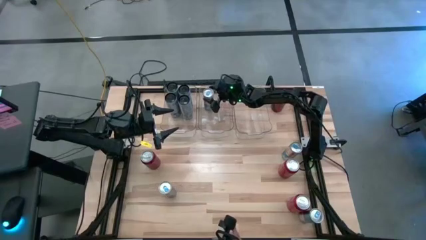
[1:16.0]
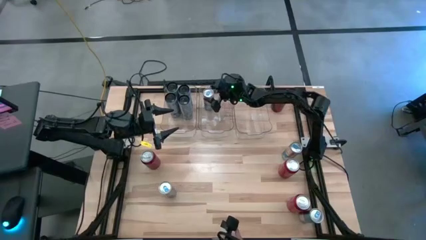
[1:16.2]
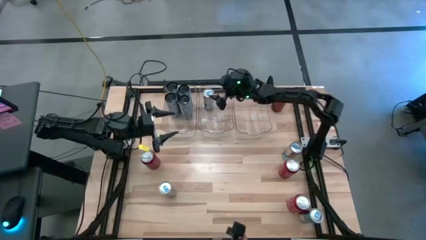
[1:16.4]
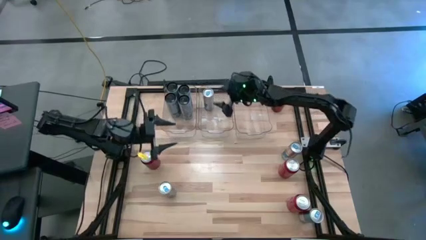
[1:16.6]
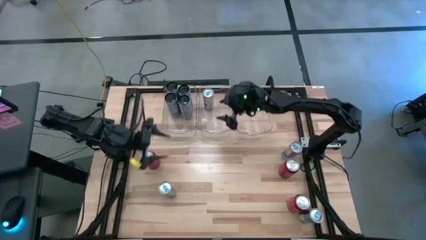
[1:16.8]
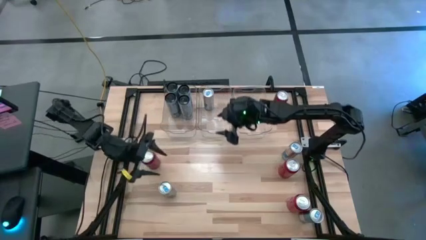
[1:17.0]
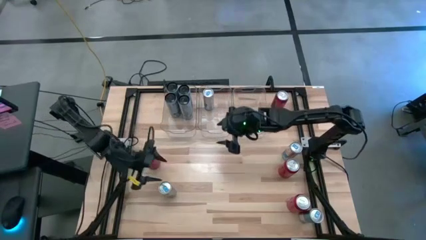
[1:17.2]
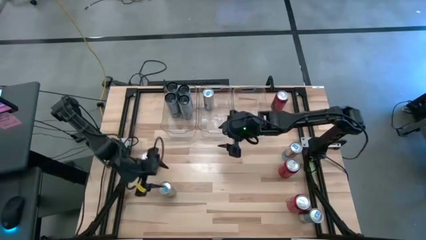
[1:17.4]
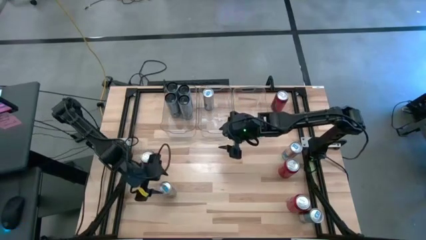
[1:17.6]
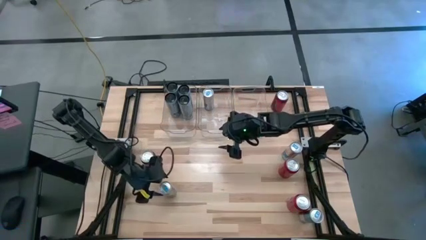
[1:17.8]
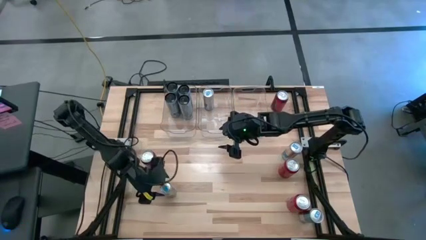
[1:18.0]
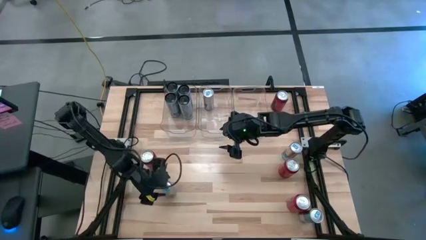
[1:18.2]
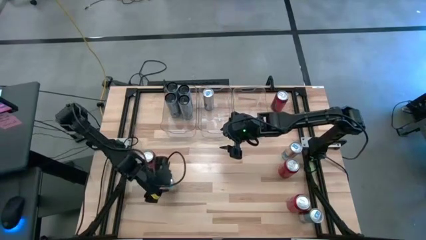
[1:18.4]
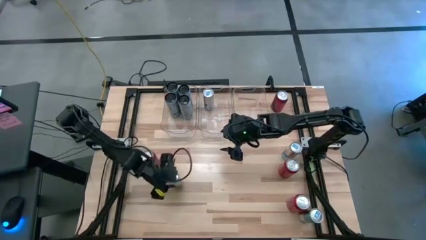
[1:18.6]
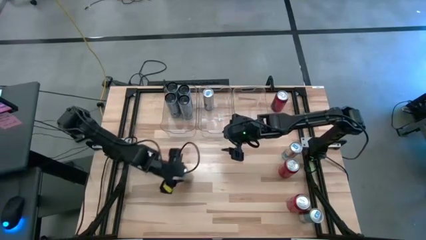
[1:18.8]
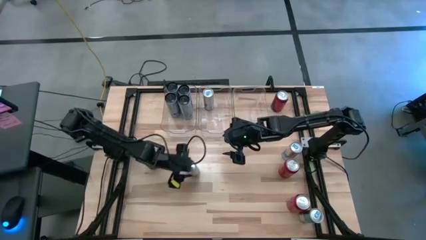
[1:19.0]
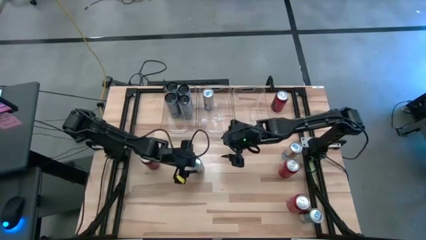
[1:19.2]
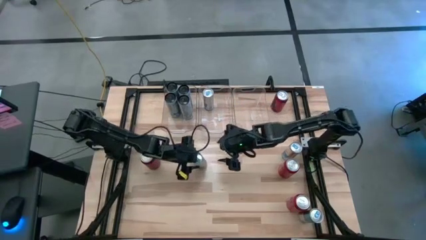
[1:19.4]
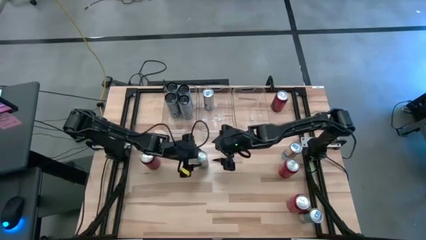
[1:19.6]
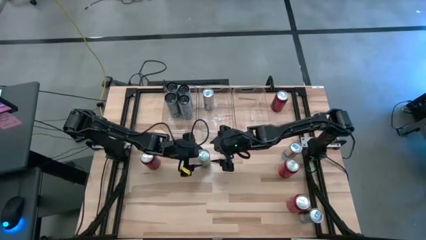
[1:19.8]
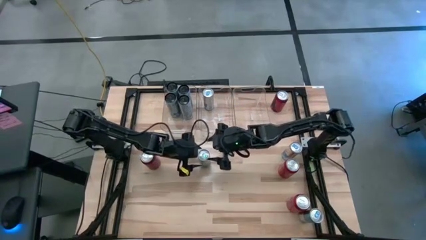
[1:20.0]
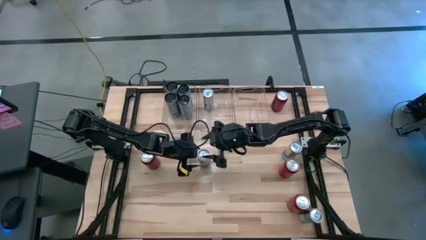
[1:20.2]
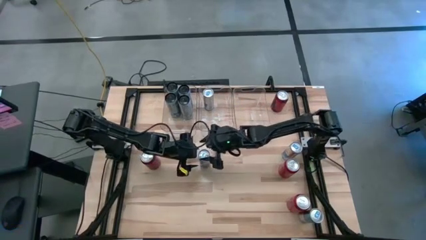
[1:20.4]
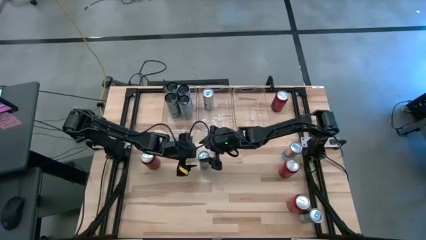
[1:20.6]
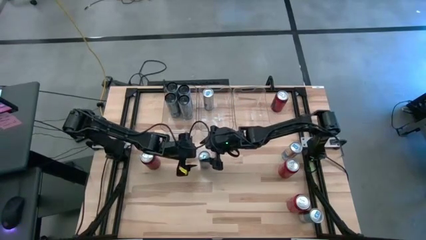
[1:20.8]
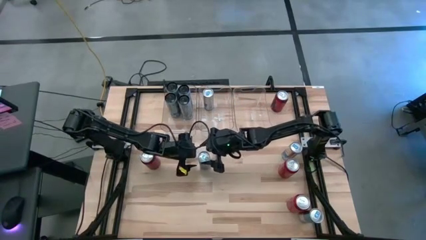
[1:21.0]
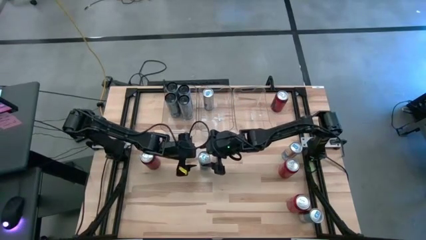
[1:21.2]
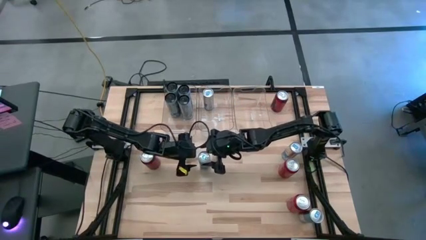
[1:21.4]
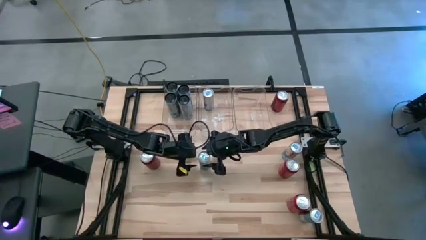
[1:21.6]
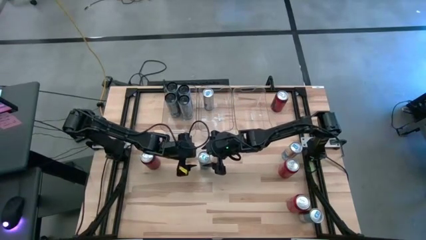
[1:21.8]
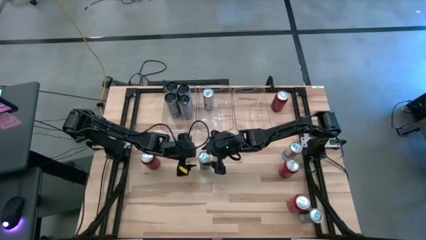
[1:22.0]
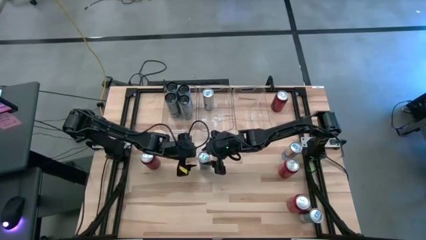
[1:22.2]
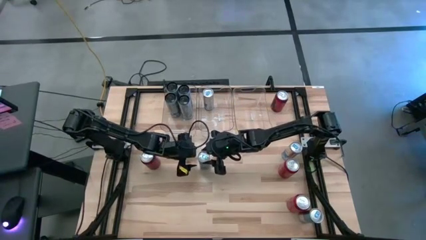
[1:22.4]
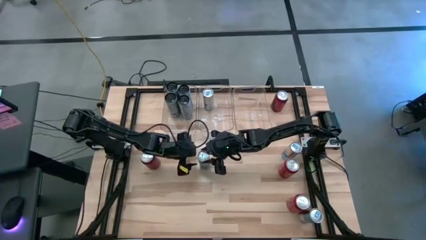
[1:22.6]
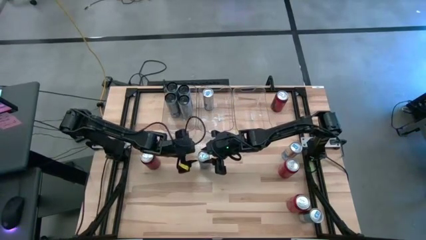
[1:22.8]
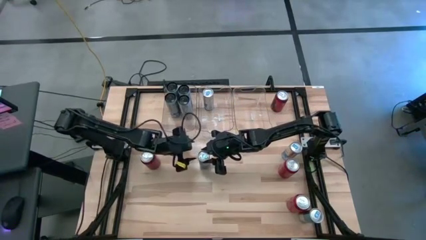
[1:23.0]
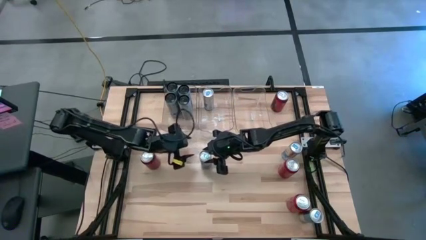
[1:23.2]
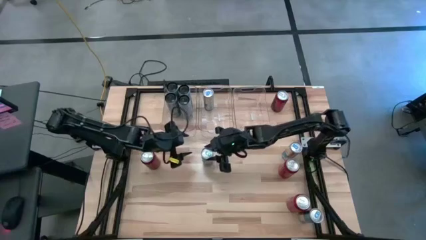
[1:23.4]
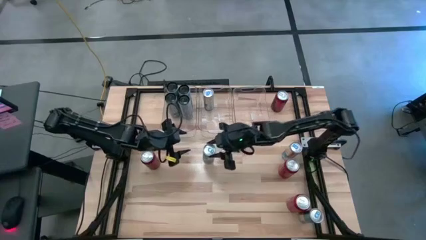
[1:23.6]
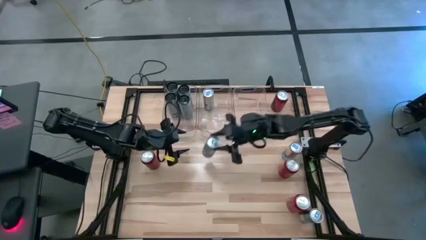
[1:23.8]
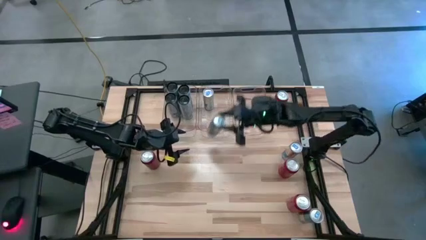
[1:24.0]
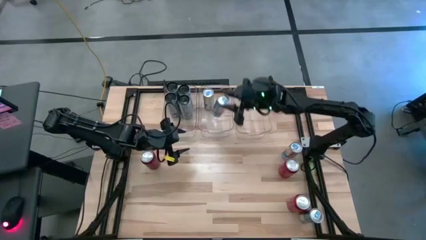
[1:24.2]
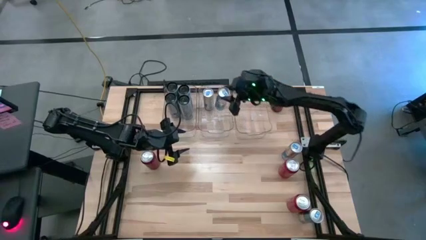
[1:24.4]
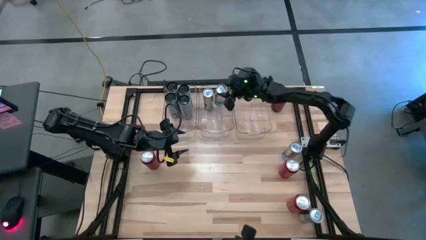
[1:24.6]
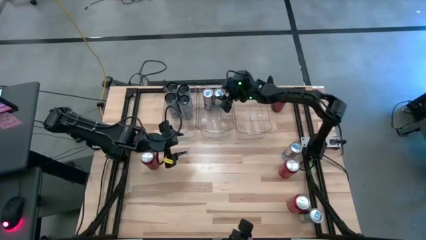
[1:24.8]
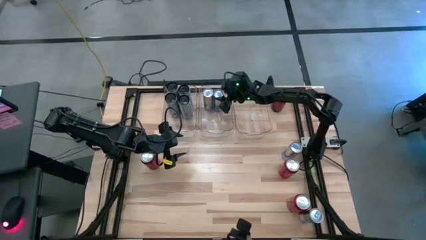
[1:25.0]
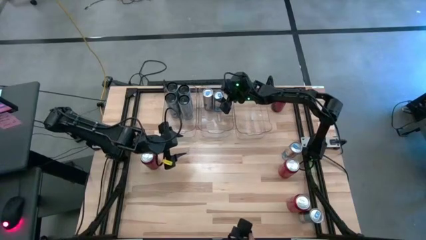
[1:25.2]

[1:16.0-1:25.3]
Task: Sort soda cans
Put the blue soda can into the middle transparent bin

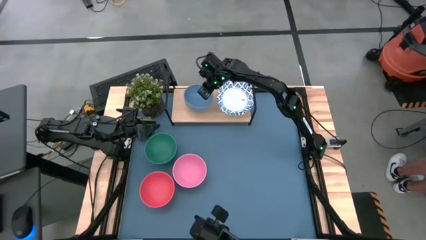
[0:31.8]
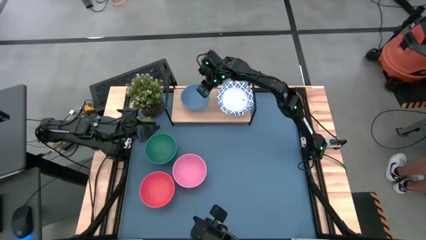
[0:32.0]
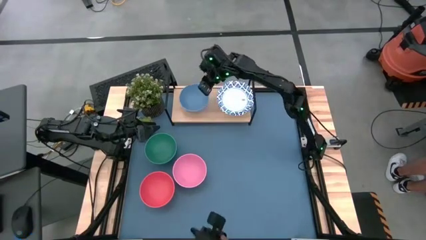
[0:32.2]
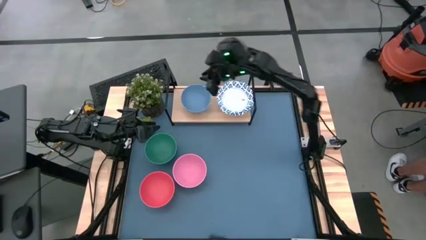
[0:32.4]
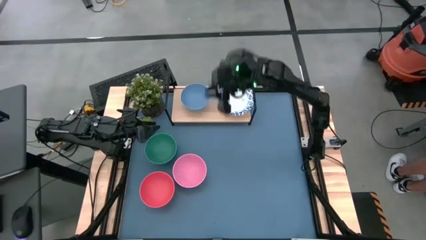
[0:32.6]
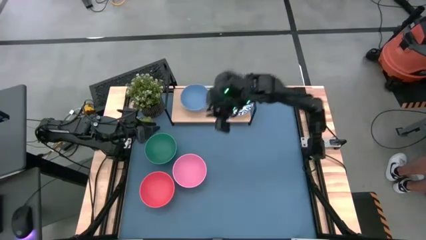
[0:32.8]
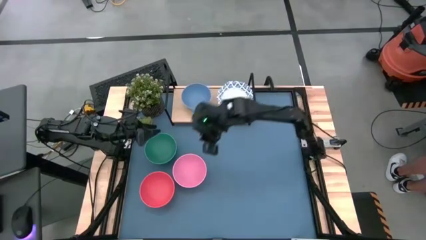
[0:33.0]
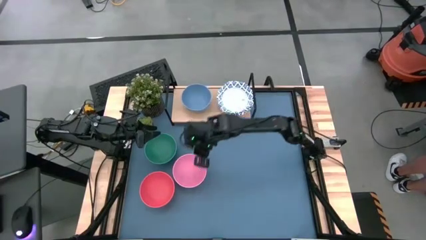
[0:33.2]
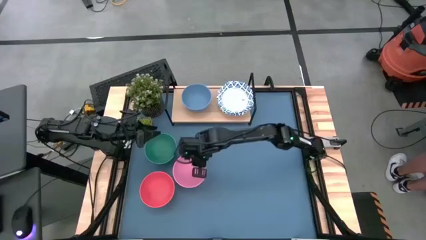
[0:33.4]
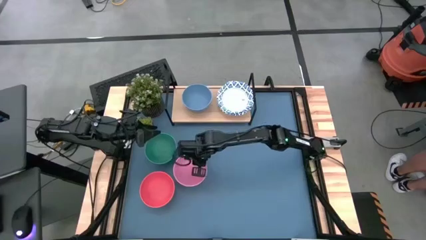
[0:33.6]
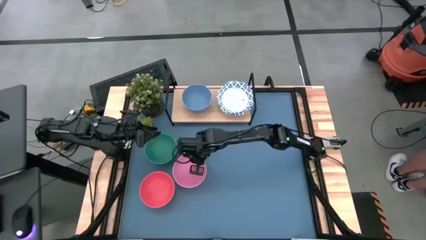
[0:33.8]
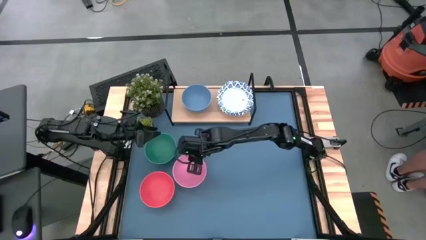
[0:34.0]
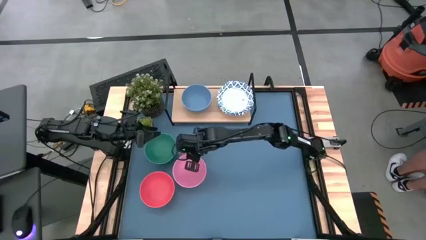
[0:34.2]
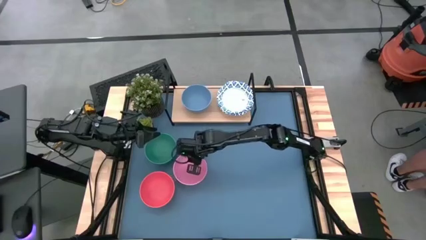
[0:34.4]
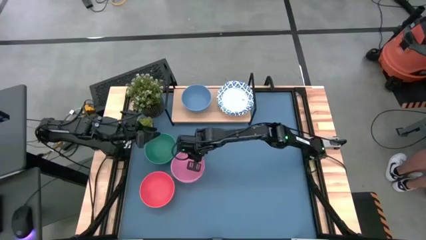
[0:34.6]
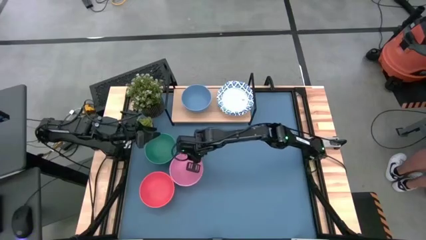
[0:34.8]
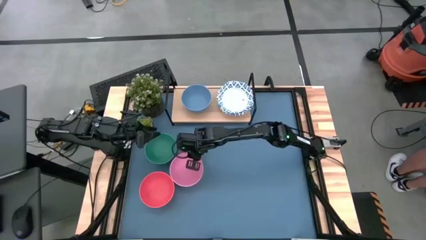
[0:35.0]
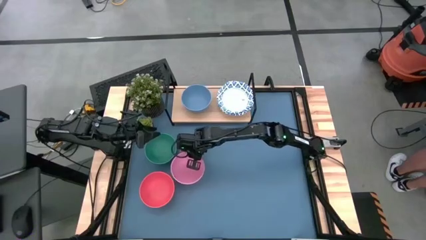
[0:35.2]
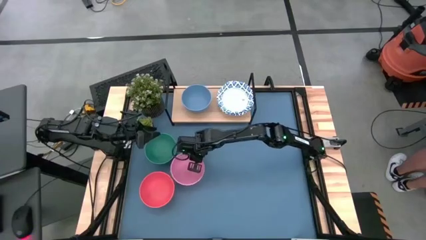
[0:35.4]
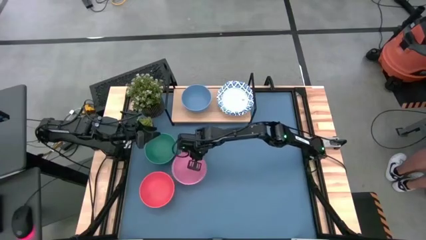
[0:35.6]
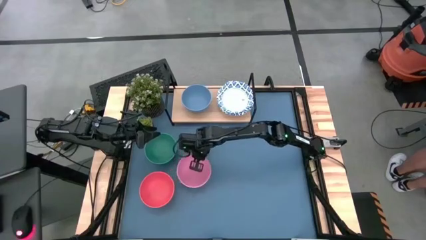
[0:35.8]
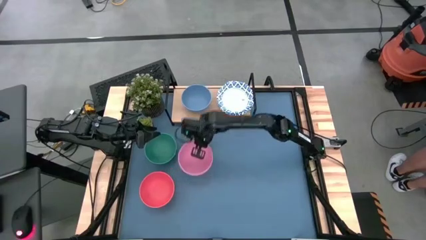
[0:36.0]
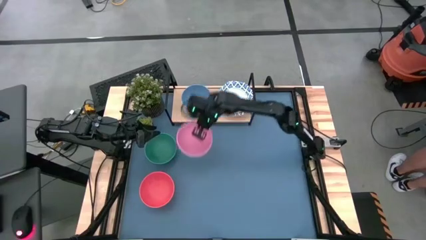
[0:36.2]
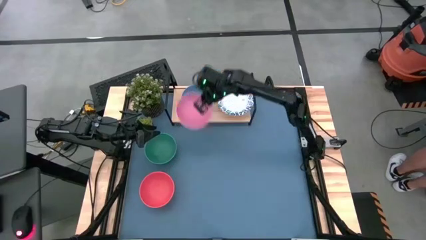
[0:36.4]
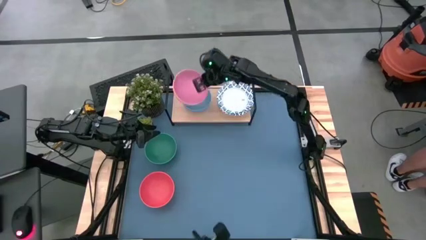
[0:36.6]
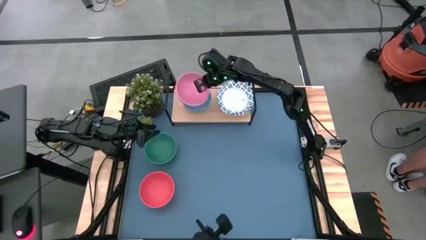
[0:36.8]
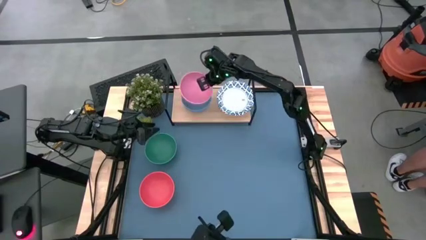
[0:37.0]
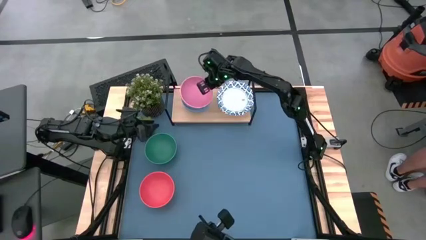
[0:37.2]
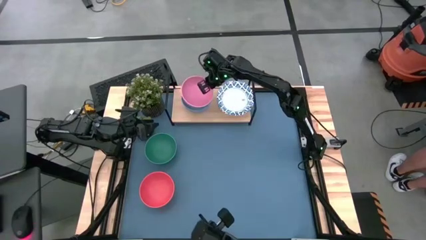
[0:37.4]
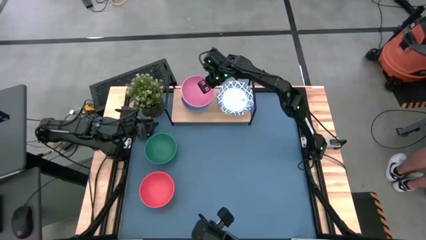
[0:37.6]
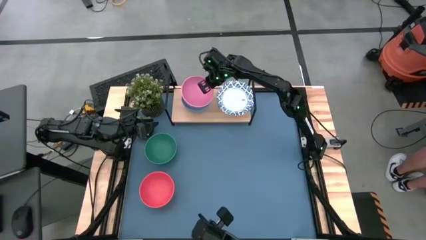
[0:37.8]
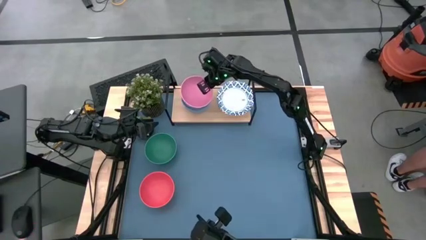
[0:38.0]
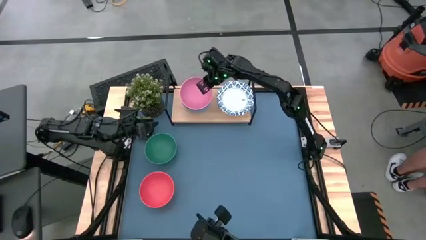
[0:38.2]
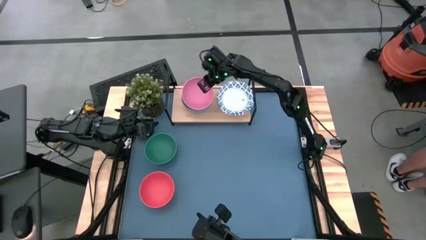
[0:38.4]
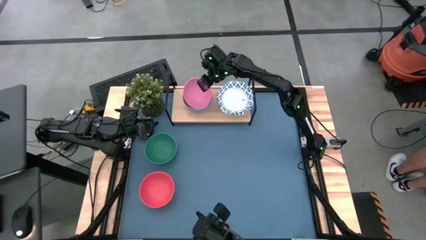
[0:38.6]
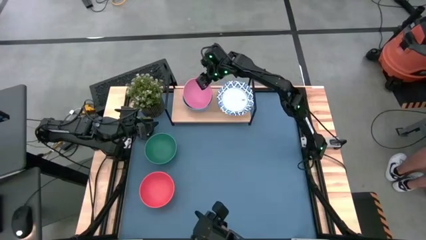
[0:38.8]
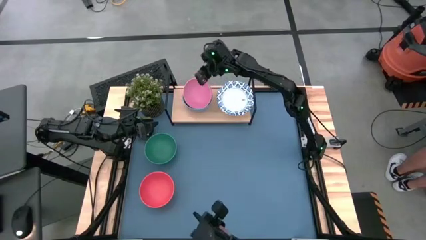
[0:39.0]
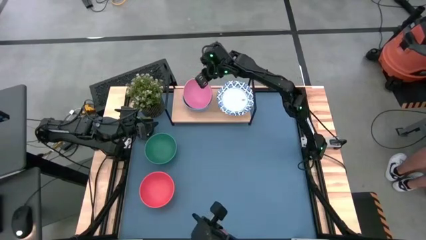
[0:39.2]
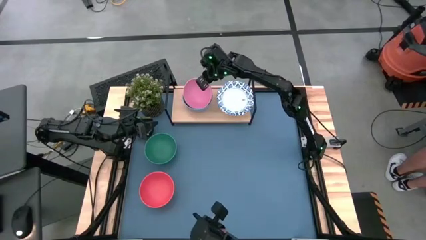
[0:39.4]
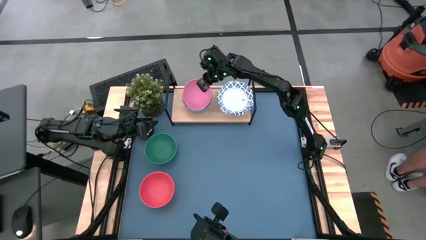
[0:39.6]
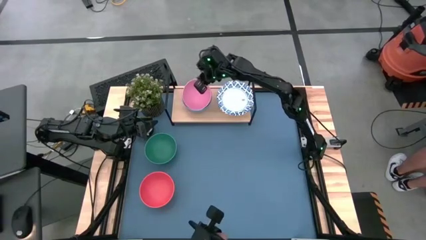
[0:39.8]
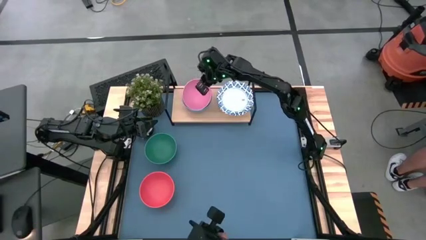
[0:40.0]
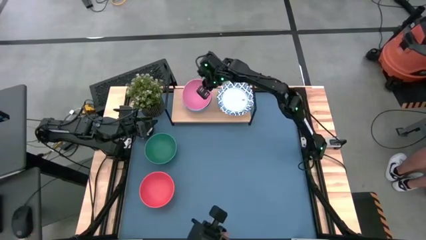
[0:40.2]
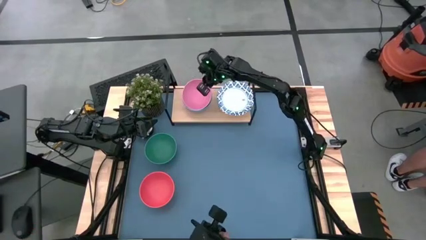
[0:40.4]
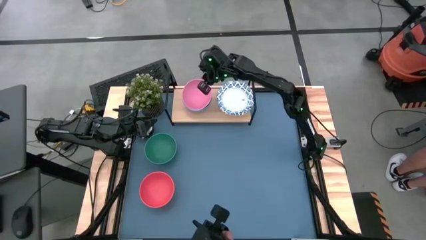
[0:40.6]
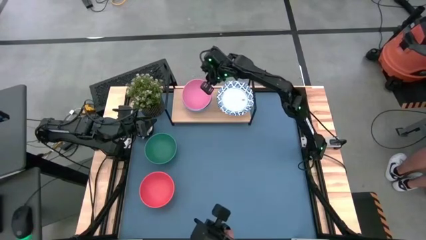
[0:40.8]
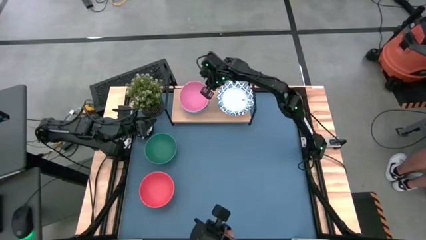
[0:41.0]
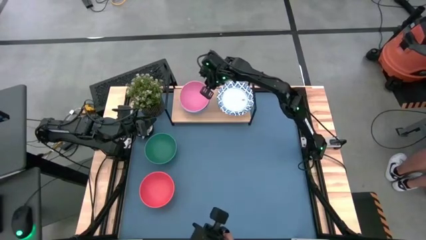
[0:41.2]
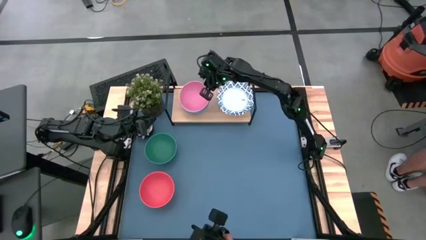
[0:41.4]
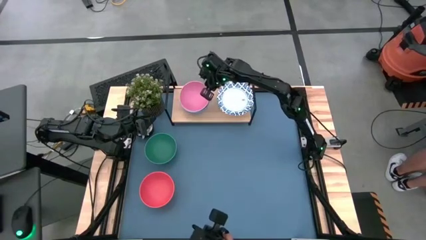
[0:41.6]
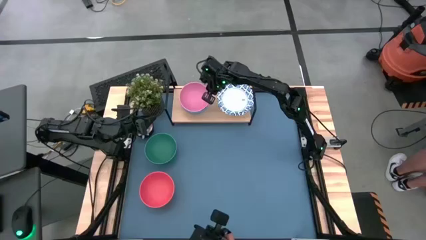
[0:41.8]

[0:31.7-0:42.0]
Task: Place and stack bowls onto a shelf
Stack the pink bowl on top of the blue bowl on the shelf
